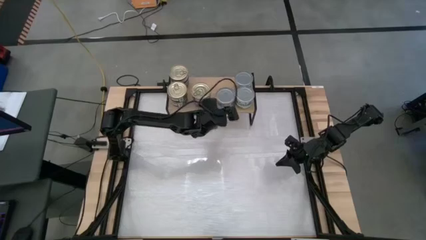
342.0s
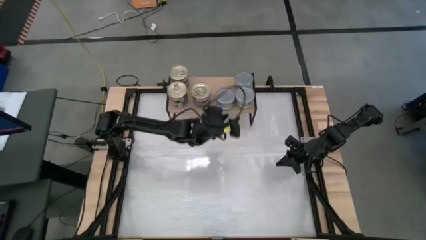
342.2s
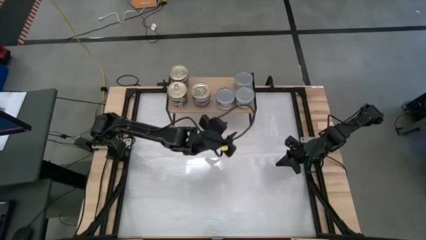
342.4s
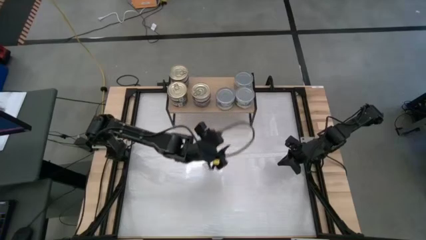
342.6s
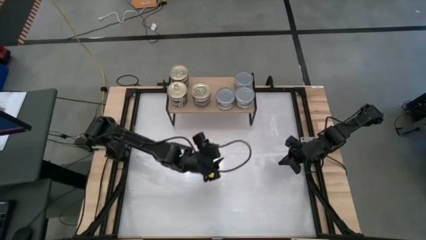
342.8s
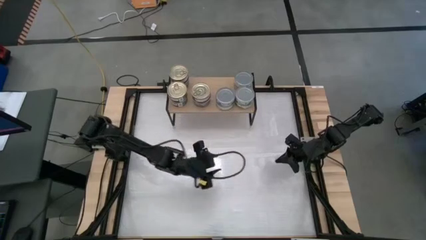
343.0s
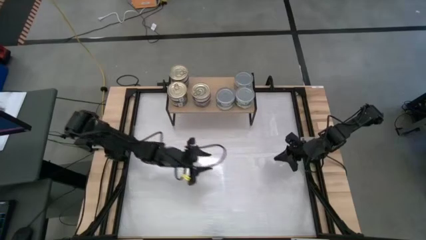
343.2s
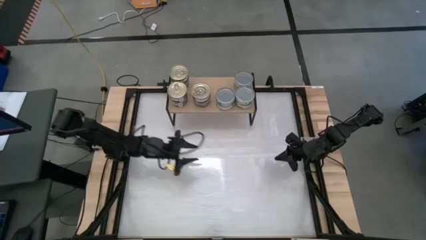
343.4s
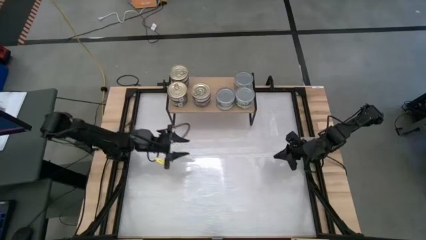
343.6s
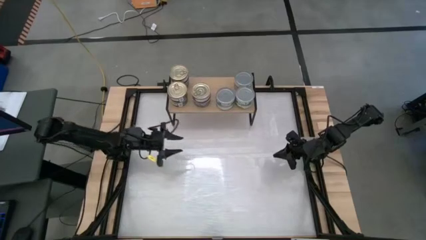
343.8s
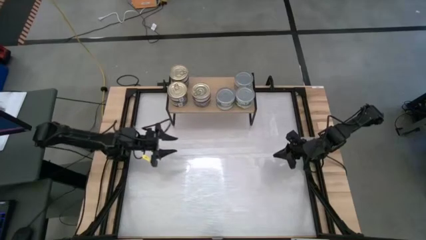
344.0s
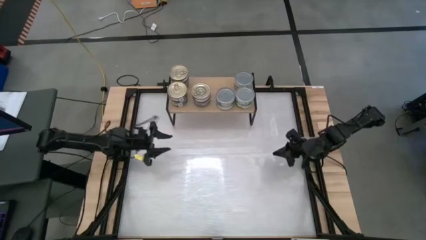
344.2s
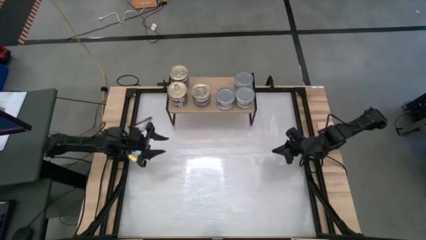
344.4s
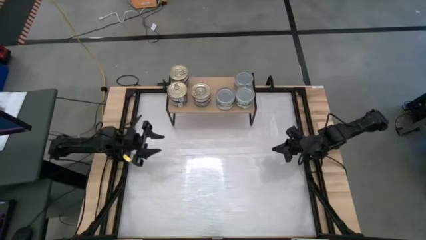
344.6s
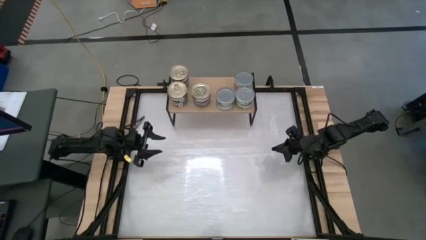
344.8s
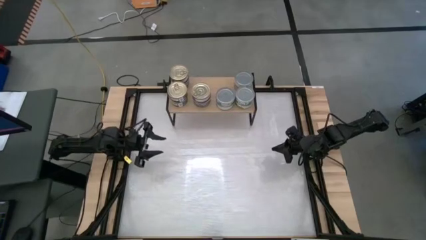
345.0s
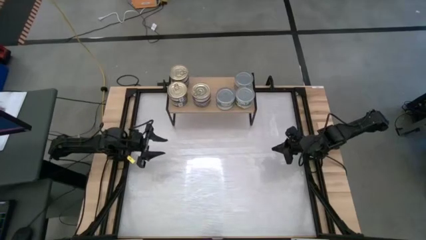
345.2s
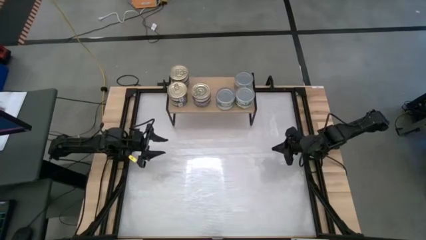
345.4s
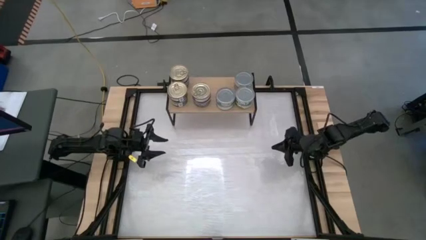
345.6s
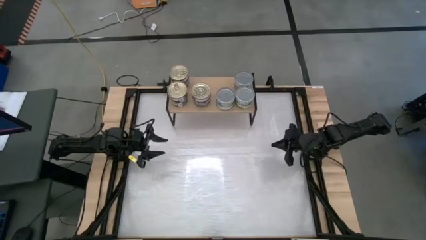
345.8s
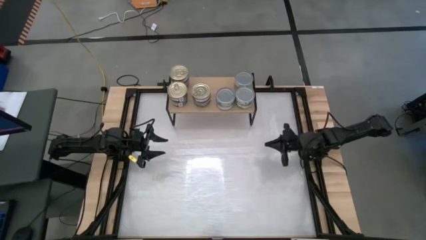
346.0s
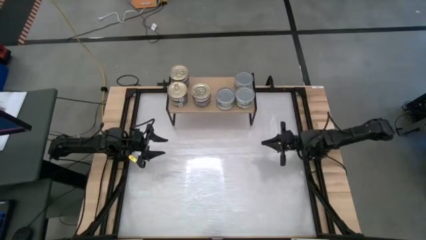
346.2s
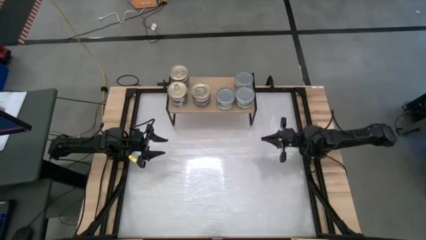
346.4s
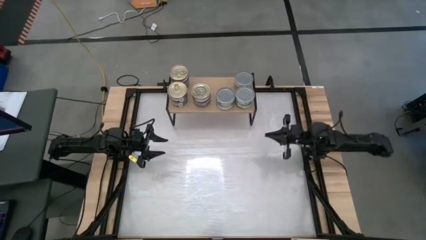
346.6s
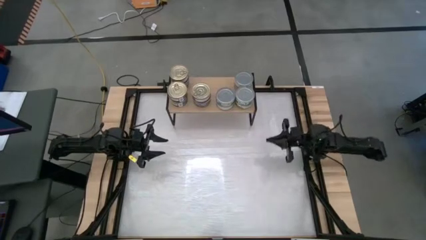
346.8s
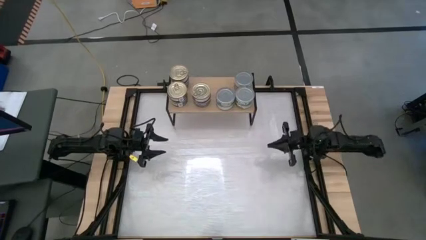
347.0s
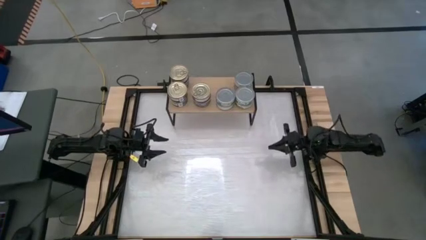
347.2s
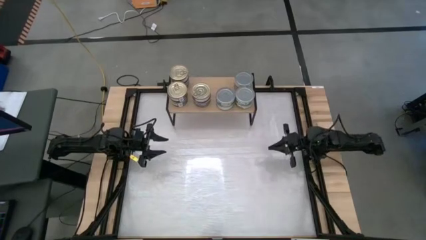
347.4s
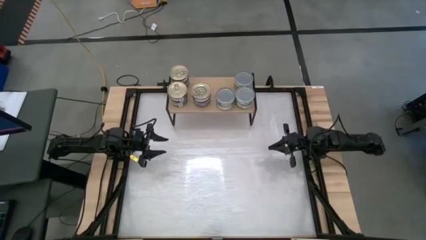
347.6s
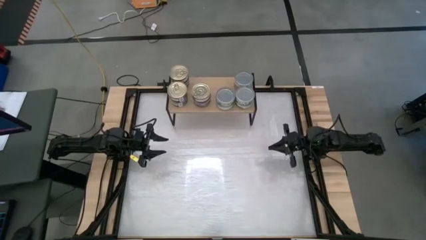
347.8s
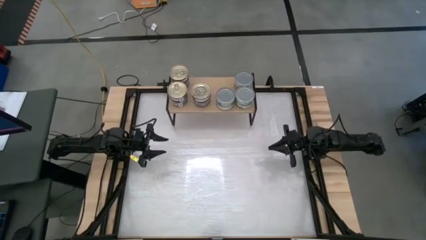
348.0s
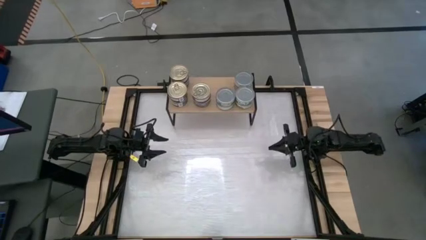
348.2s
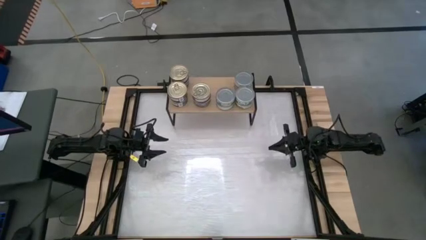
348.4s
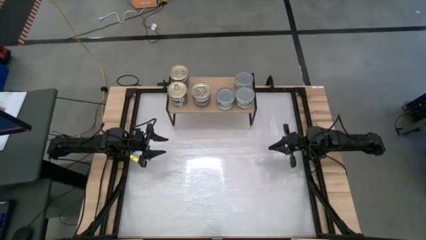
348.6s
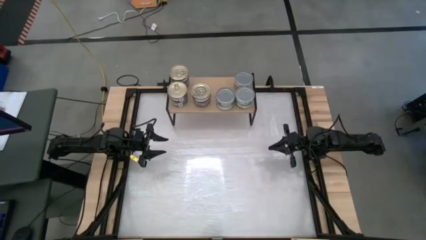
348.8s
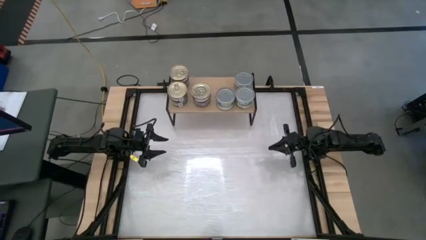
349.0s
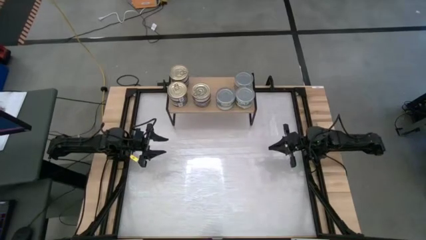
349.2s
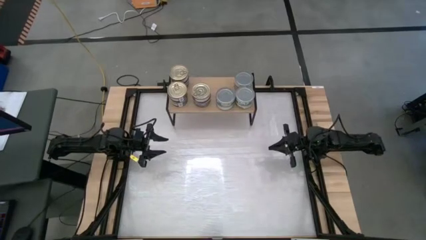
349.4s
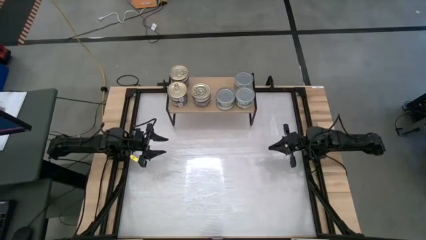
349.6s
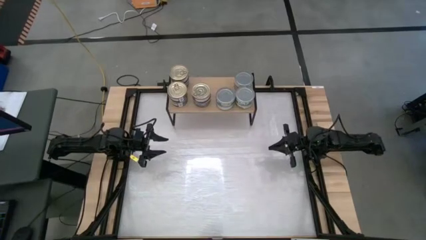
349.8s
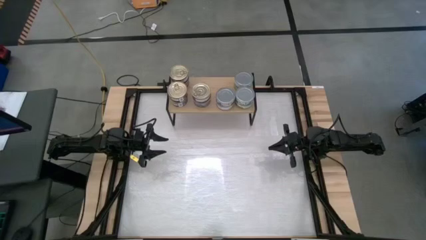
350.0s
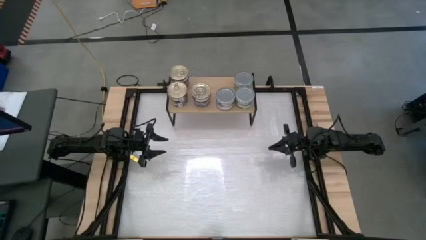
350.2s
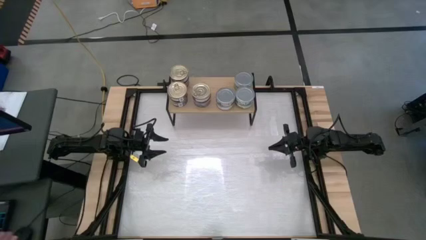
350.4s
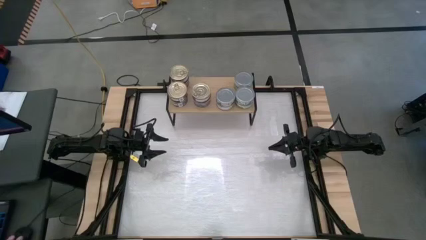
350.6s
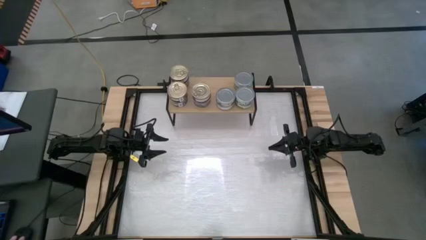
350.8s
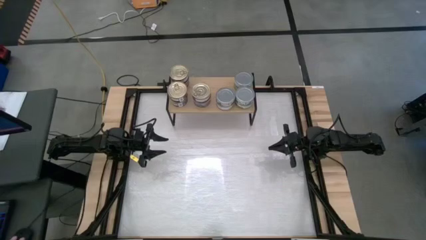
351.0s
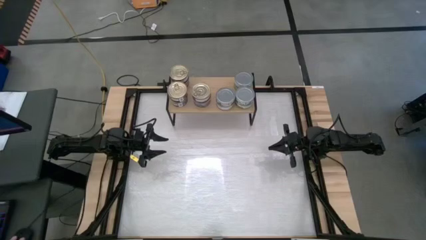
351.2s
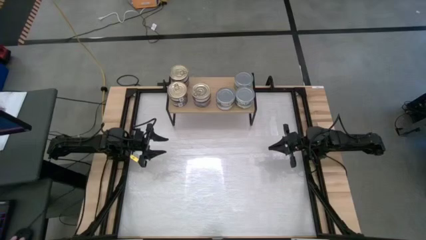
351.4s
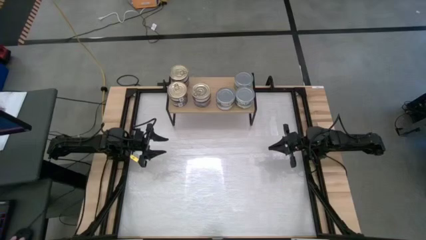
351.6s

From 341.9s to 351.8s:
Task: Stack canned seafood by type on shelf
Return to Home Position

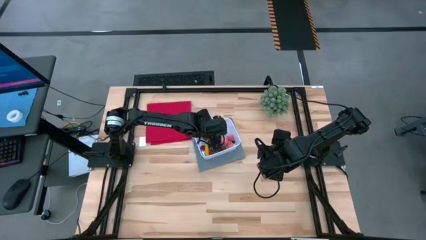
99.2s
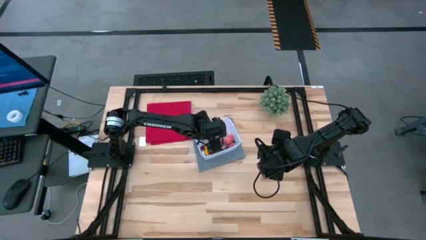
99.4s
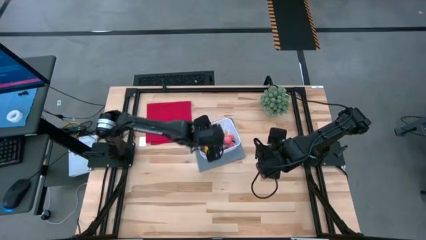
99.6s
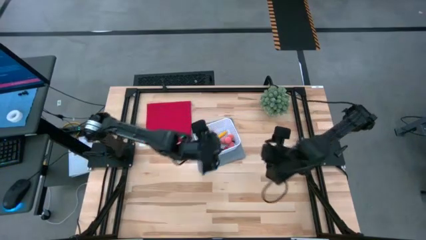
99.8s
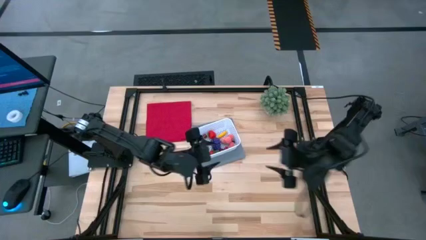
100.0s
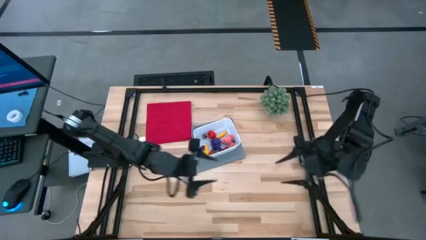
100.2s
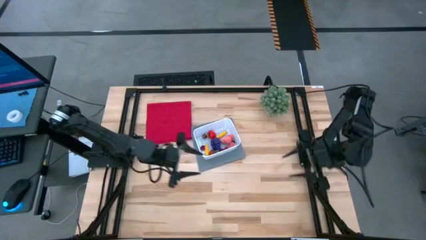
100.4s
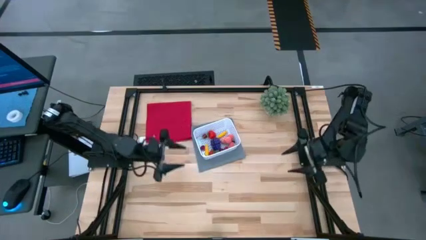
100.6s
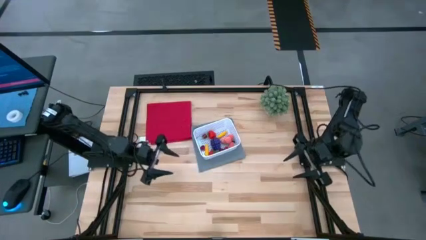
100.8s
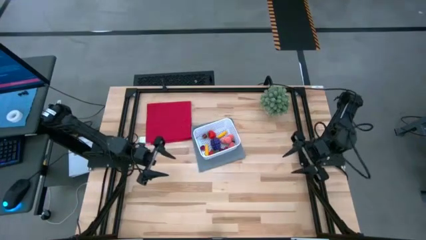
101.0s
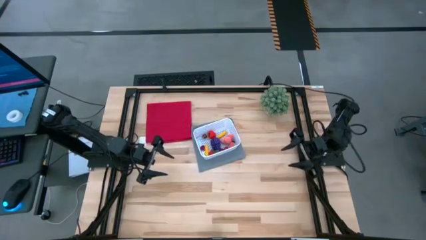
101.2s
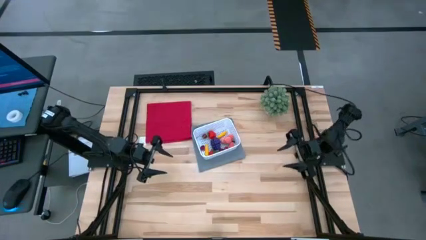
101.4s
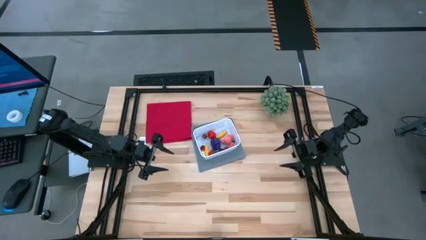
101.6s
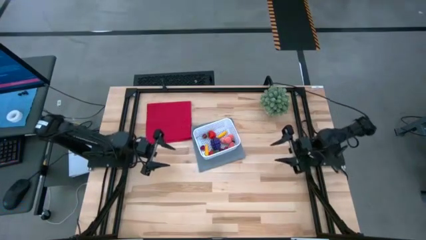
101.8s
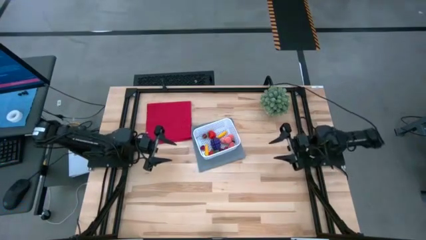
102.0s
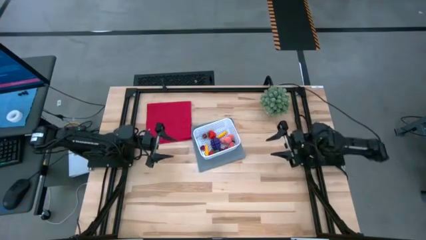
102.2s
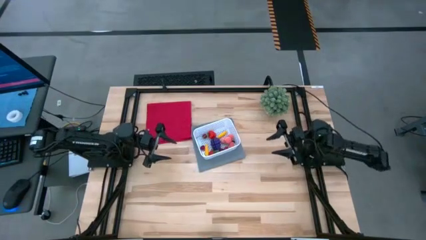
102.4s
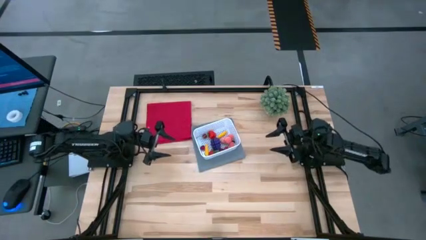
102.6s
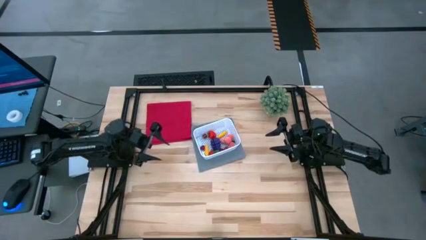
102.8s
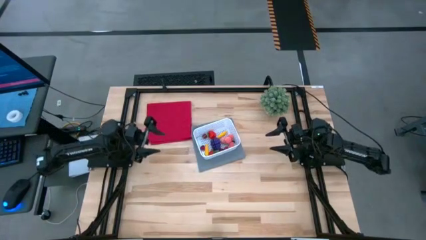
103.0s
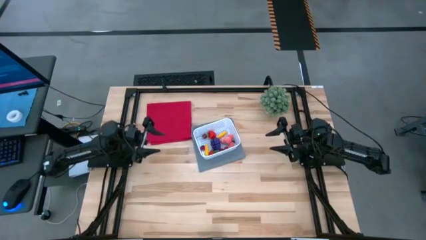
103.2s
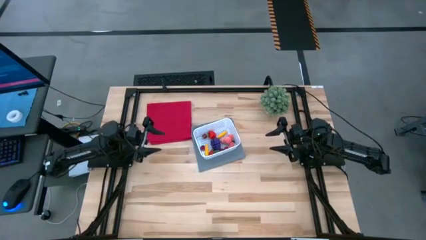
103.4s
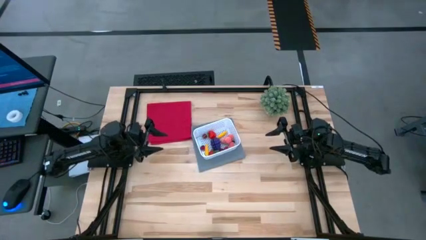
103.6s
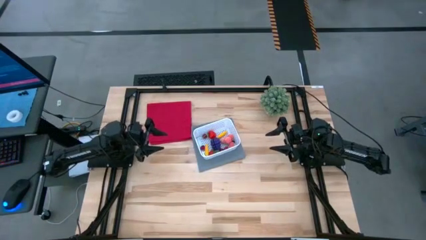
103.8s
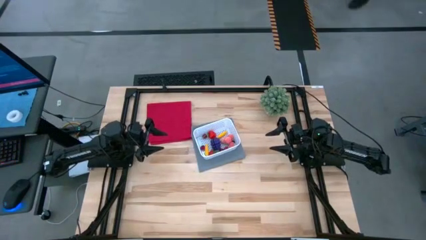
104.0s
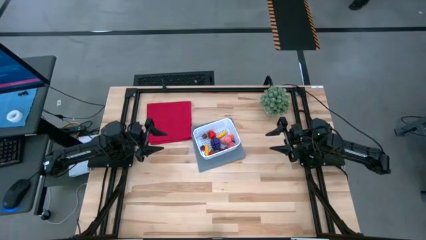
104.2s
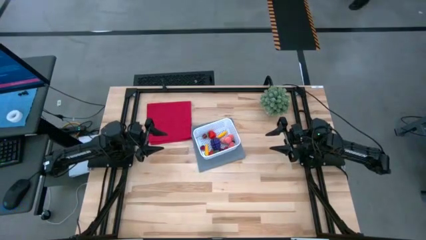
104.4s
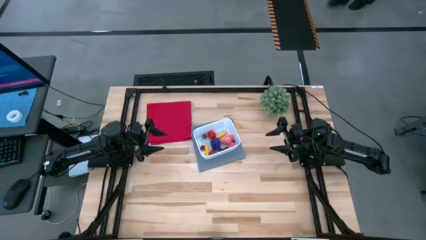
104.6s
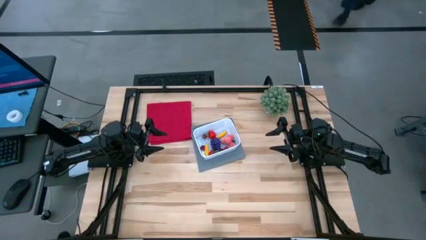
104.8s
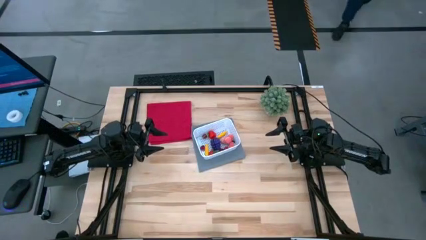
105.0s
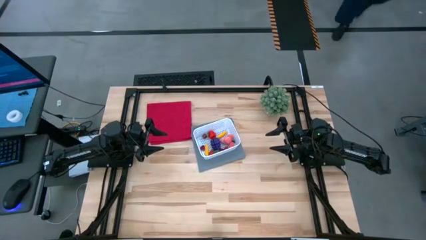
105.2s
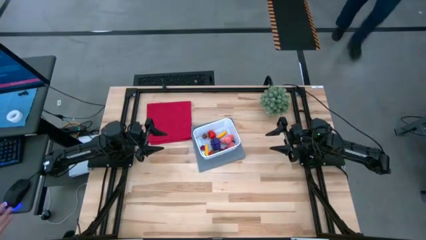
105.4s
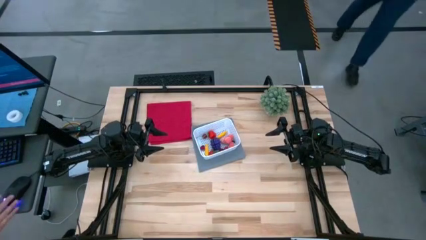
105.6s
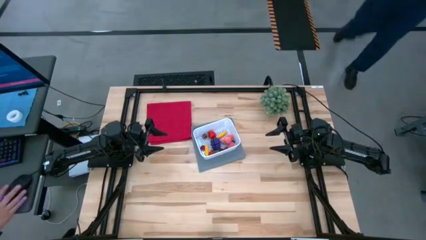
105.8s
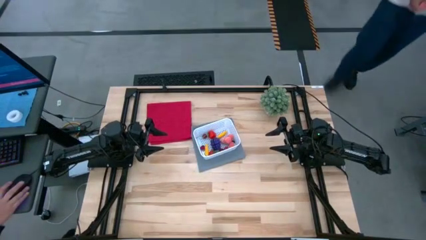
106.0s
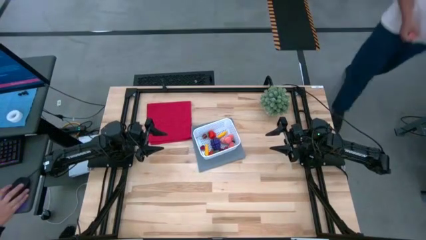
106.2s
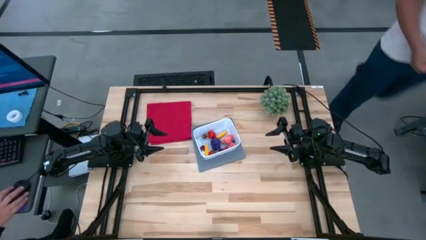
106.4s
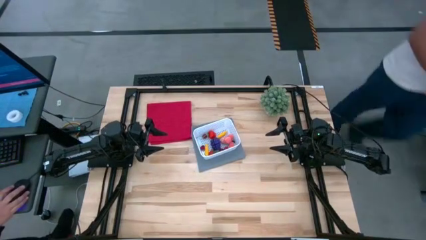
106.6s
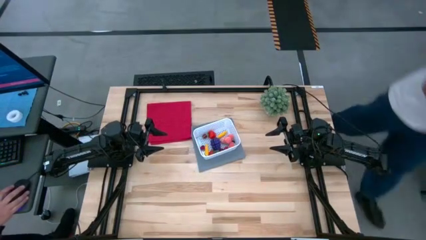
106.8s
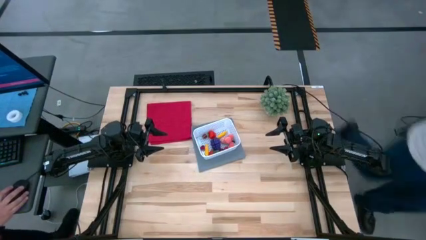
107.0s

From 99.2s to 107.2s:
Task: Pick and placing Produce into tupperware
Return to Home Position
